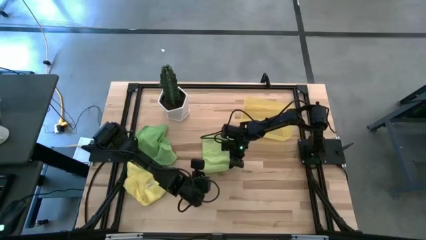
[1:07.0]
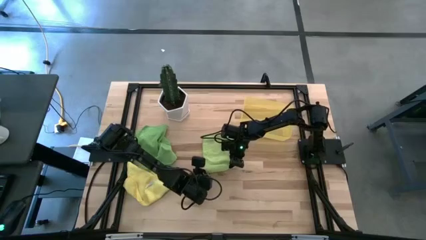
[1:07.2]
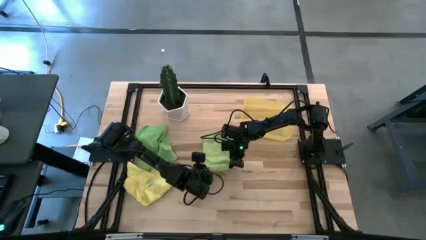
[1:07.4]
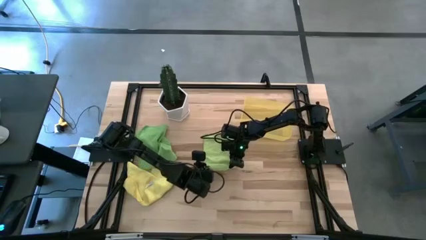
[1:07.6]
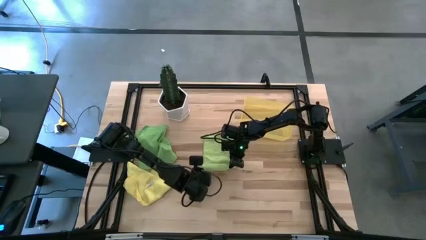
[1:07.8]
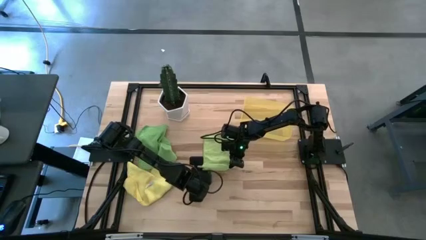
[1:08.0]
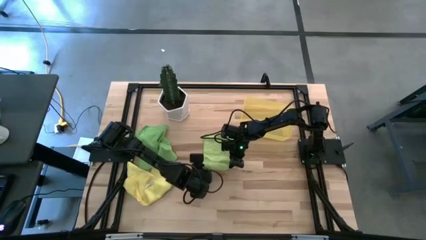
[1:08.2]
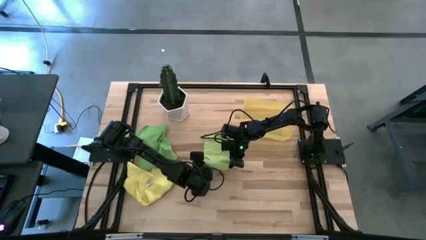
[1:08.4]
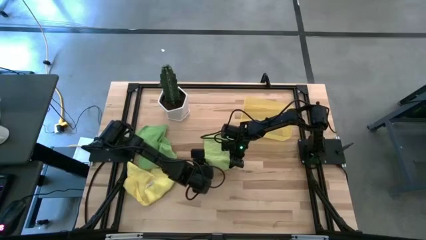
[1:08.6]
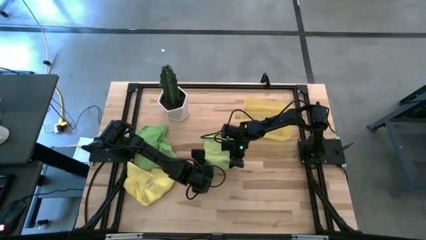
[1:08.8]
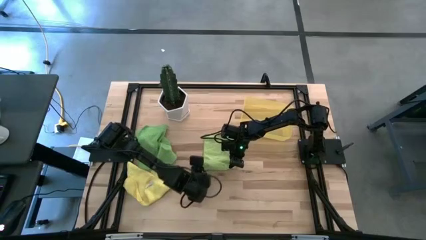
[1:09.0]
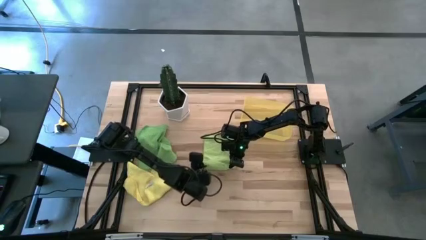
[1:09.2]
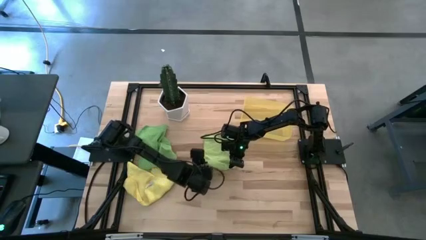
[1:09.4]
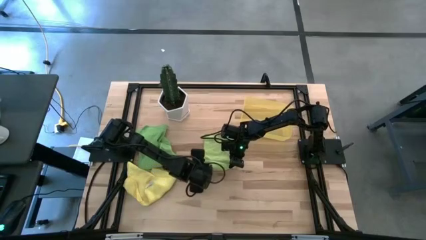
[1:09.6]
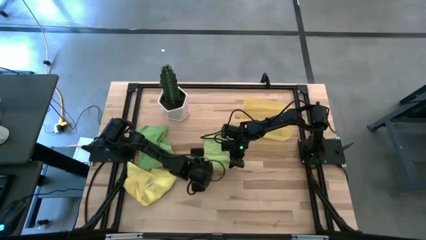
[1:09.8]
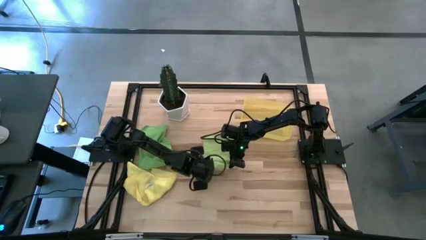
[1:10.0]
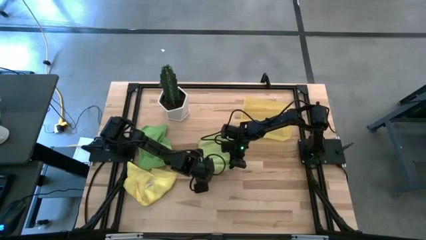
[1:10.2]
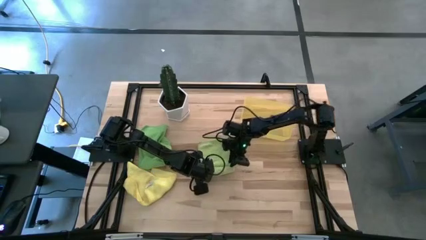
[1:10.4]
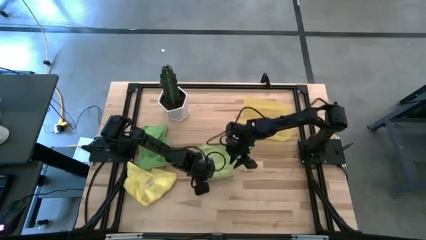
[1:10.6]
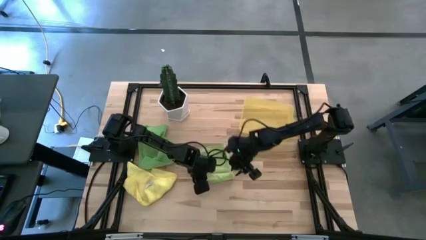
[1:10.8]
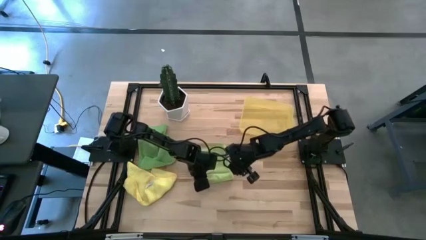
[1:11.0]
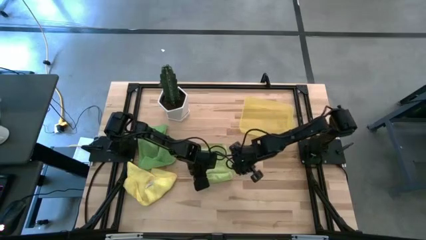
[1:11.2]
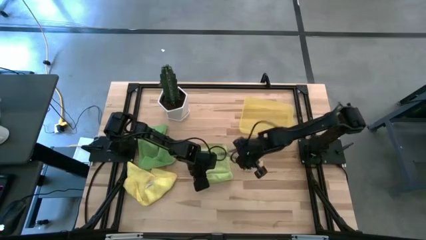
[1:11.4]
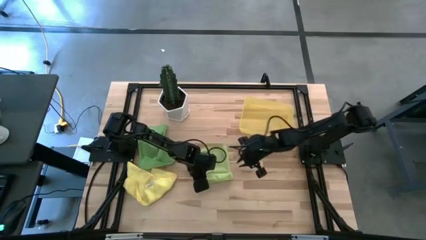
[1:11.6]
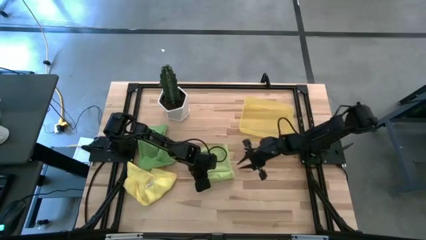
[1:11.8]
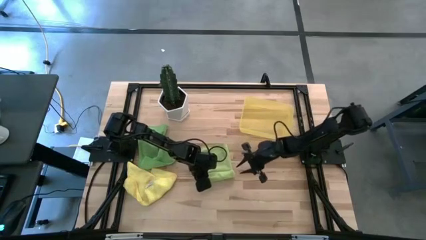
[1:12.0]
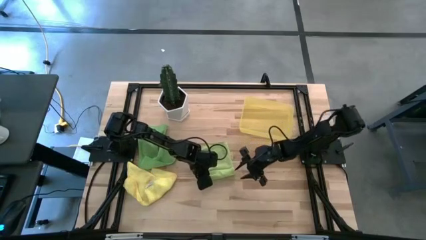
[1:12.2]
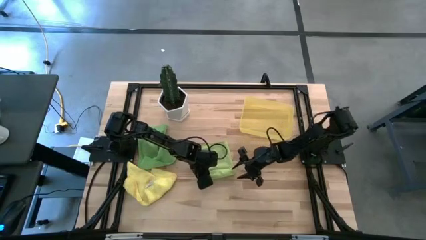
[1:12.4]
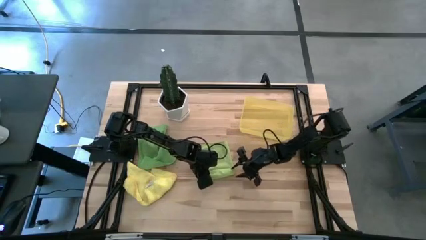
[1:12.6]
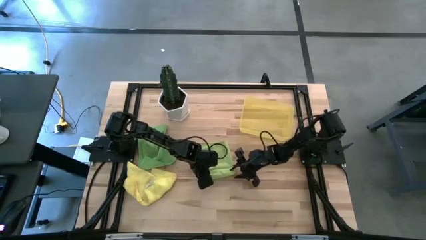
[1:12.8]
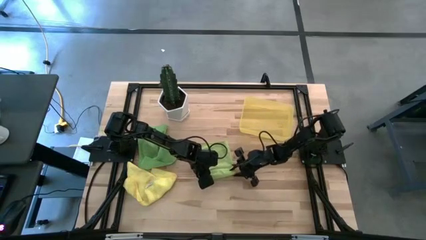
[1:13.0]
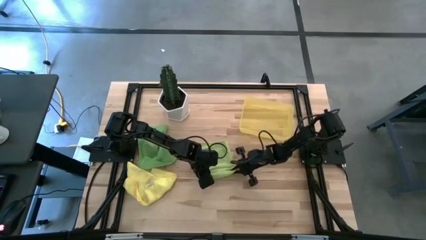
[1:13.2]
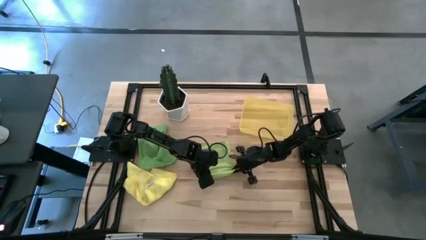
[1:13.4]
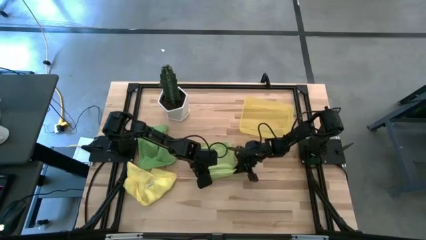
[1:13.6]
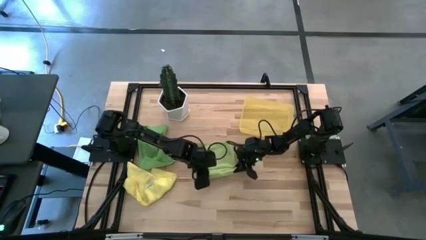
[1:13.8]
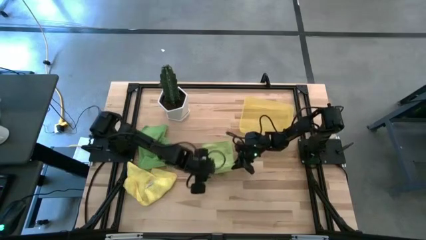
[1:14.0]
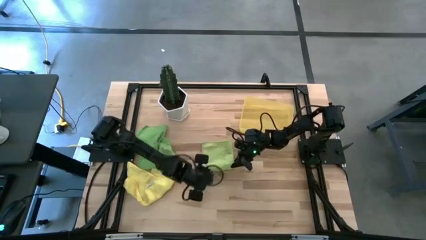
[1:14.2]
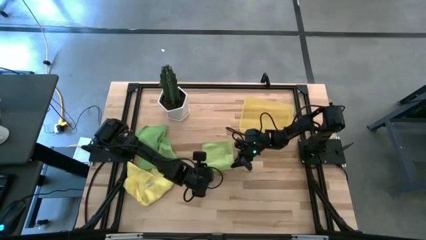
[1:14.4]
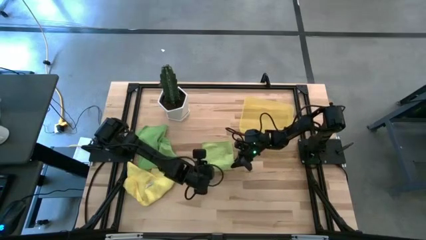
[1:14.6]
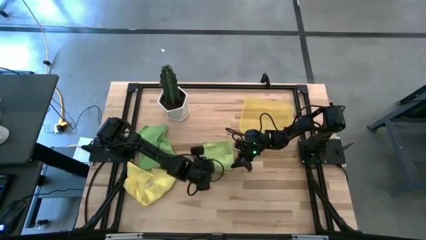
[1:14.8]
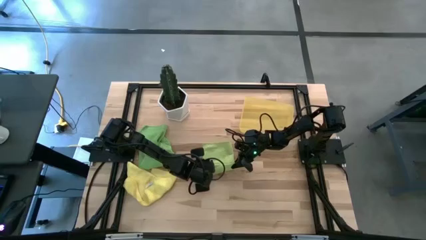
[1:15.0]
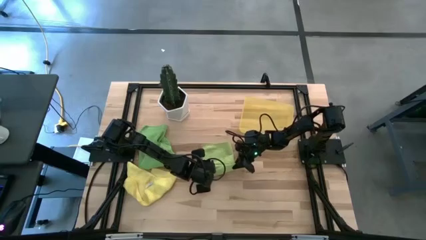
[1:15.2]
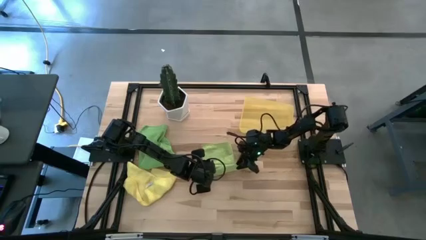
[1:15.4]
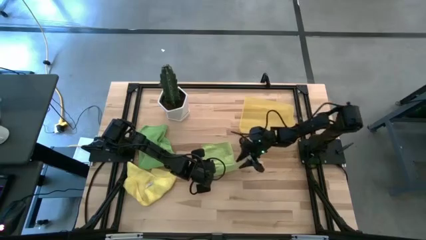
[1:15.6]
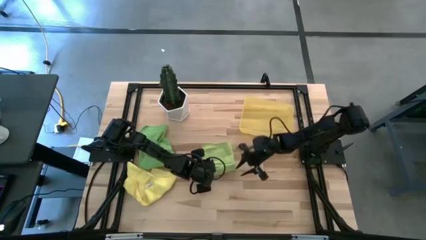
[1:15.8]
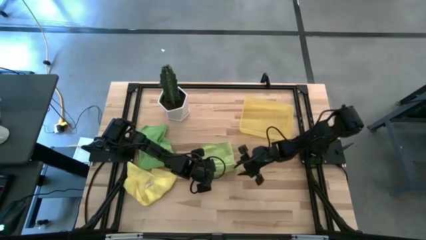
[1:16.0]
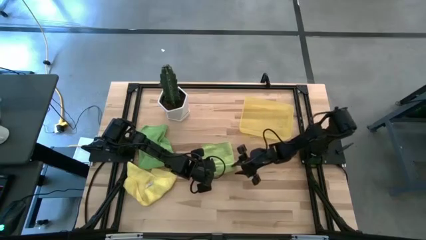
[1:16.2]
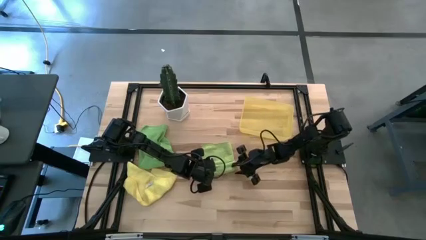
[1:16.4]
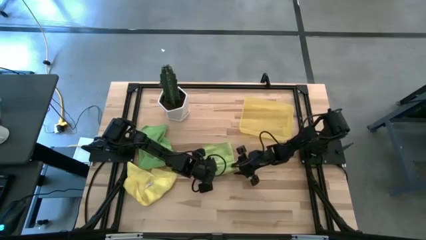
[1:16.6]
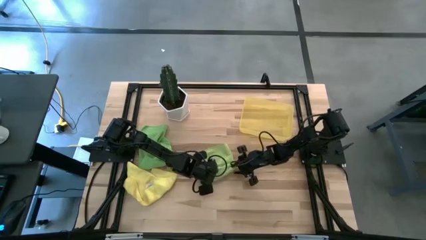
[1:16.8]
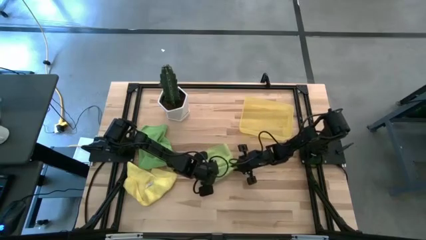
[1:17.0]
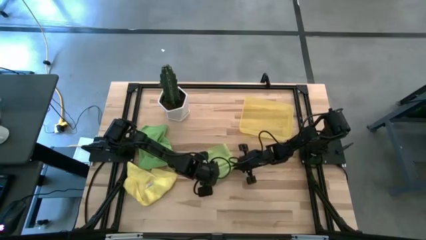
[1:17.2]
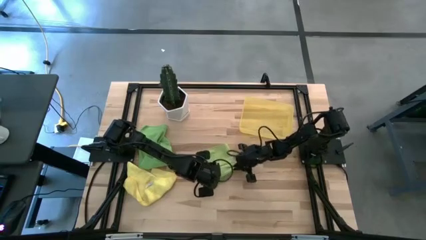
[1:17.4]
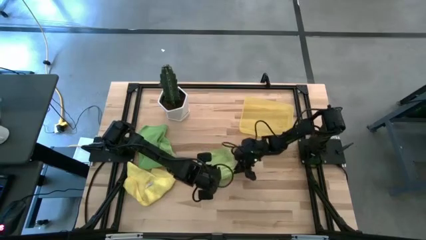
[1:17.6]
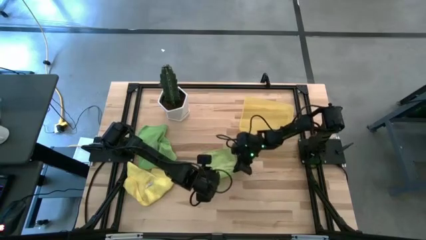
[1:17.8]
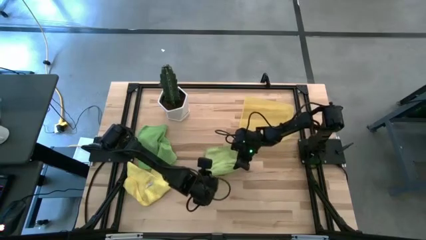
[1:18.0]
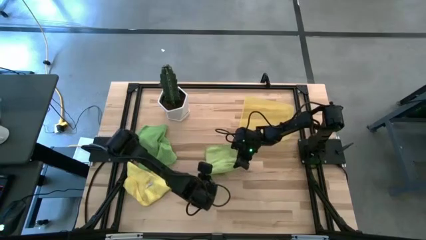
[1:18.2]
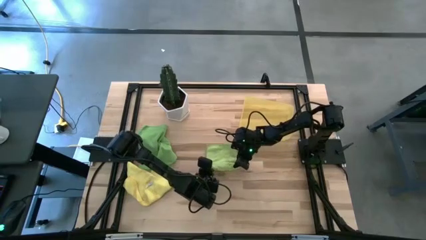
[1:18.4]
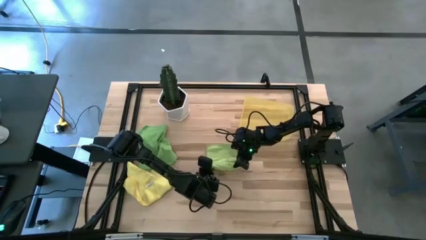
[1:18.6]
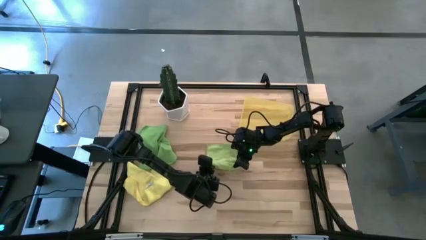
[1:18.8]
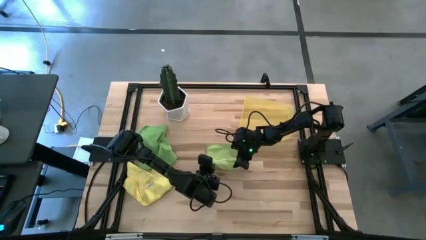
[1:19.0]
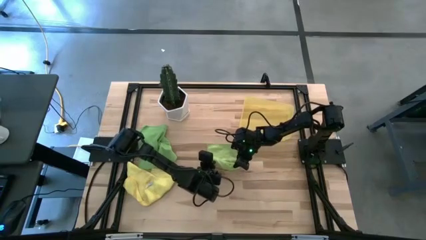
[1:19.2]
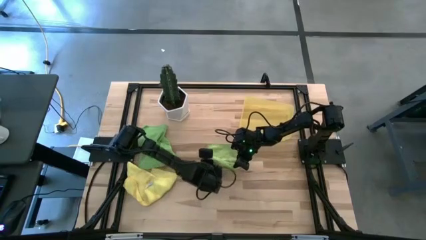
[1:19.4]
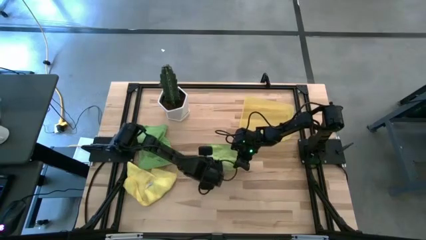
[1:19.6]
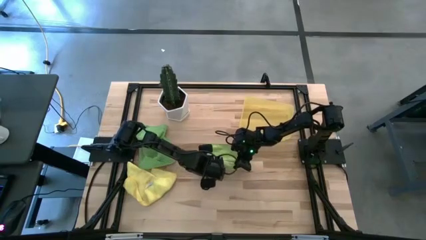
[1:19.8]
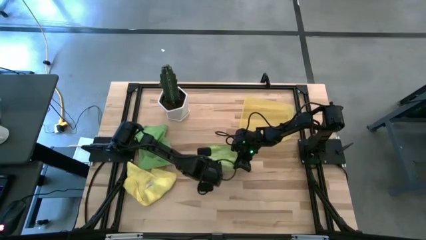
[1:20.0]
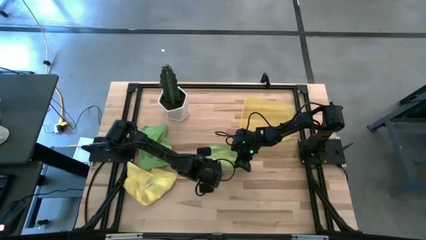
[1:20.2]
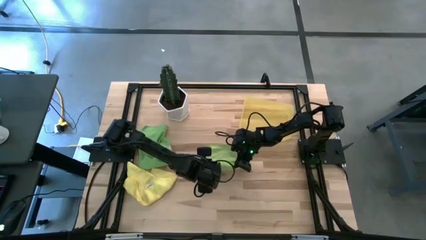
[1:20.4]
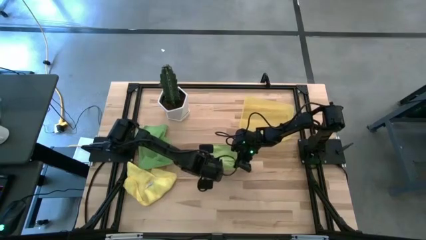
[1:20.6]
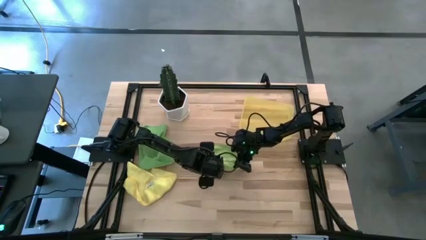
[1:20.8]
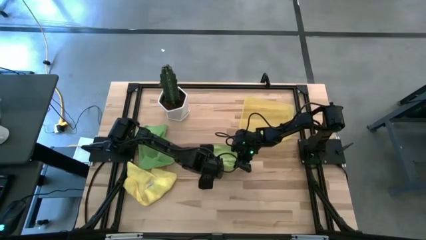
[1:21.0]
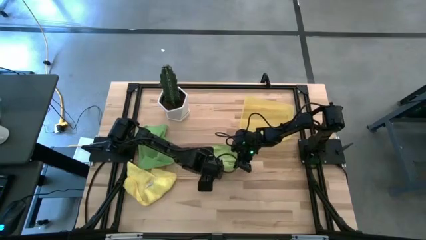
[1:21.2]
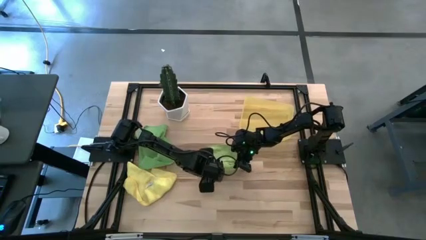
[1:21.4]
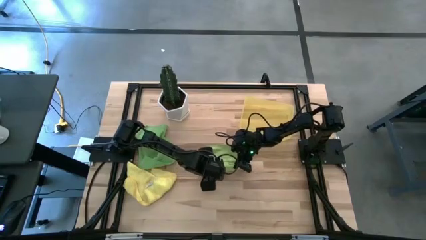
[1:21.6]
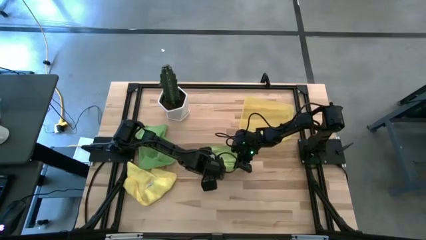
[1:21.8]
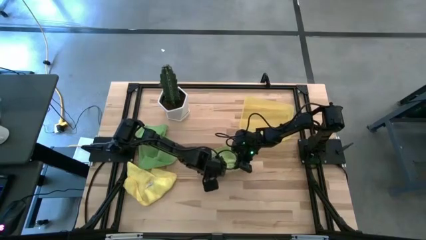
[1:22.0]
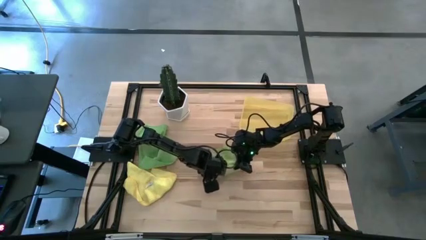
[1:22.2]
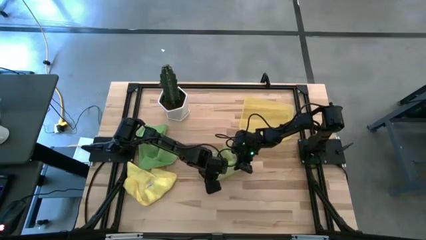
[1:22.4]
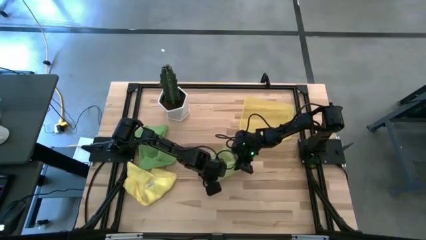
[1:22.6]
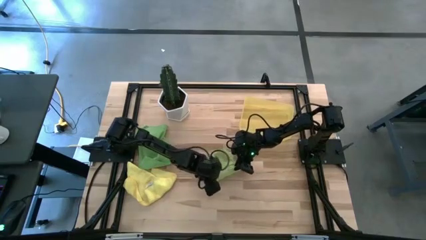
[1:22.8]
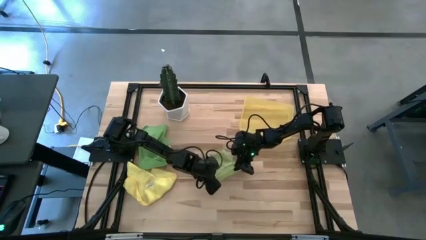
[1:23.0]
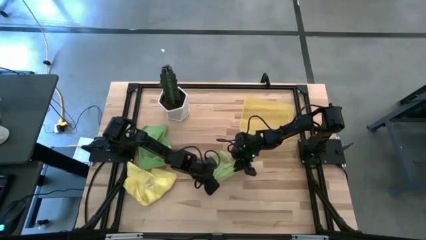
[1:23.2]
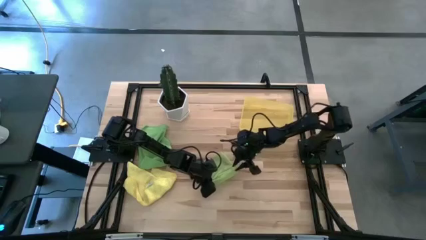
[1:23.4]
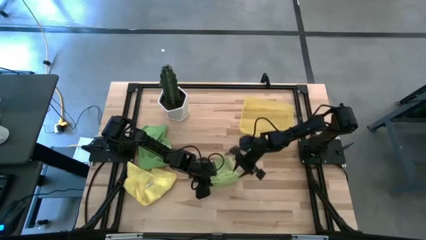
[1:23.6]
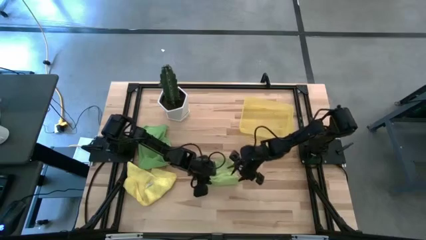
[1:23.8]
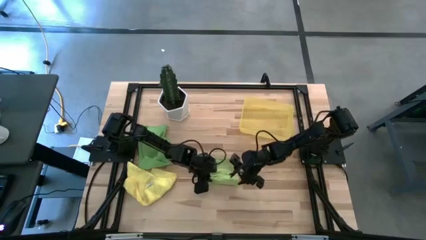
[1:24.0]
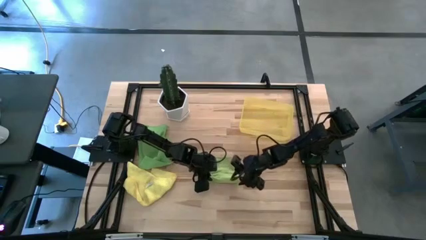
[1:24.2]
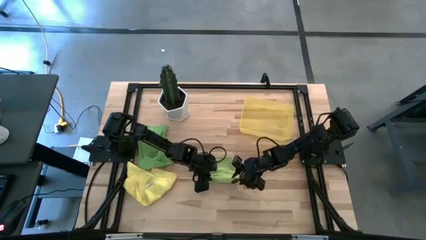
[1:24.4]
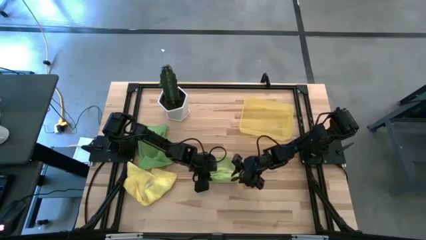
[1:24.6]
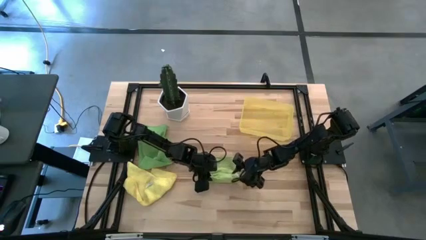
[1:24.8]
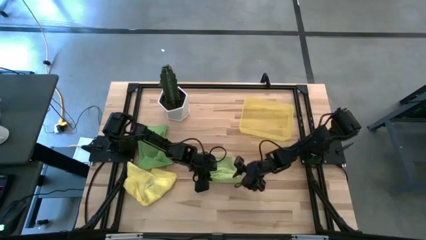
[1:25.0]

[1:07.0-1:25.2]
Task: Roll microfiber towels into tight, uniform cylinder then place into a basket
Roll the light green microfiber cloth
